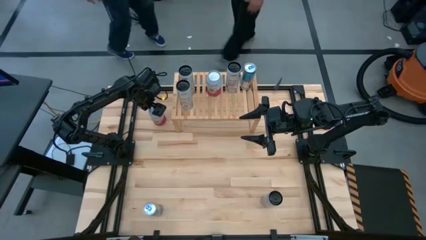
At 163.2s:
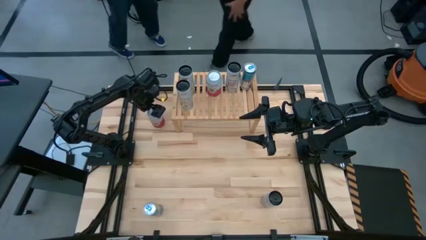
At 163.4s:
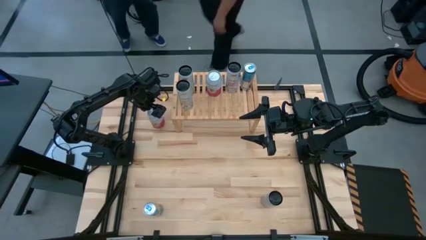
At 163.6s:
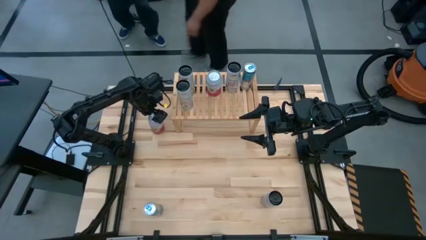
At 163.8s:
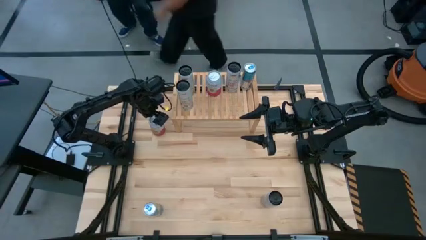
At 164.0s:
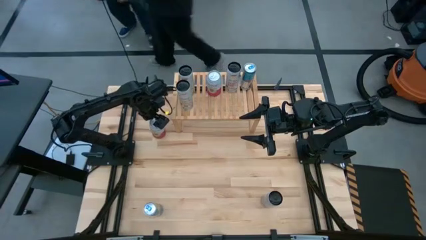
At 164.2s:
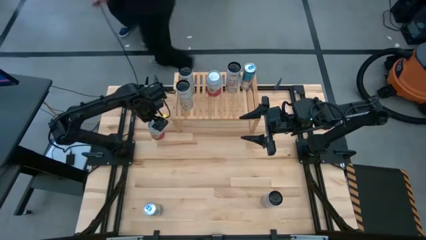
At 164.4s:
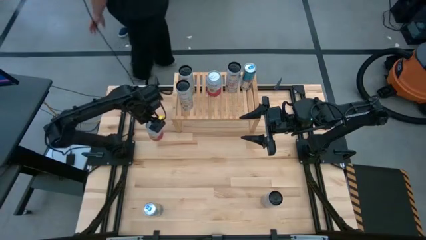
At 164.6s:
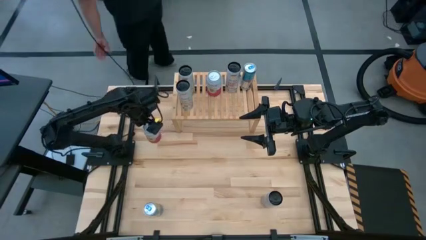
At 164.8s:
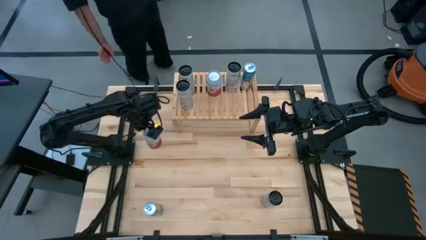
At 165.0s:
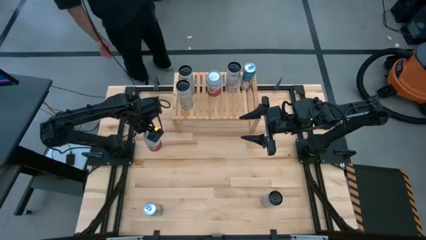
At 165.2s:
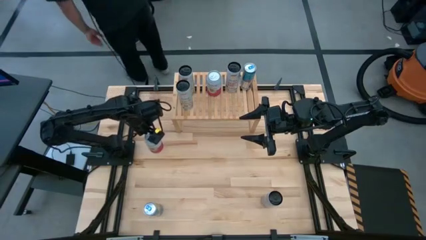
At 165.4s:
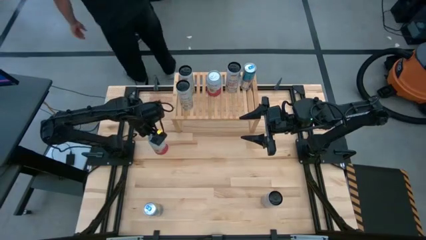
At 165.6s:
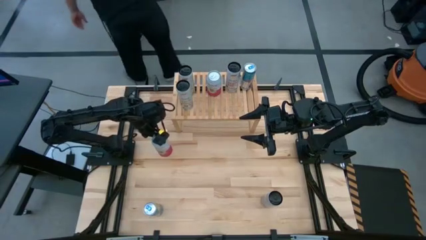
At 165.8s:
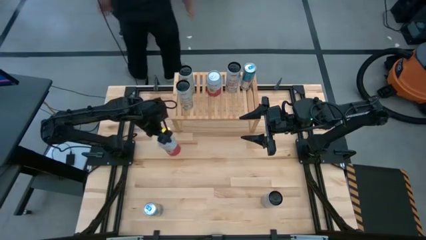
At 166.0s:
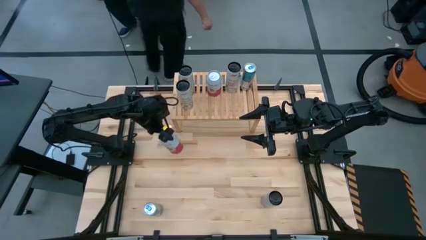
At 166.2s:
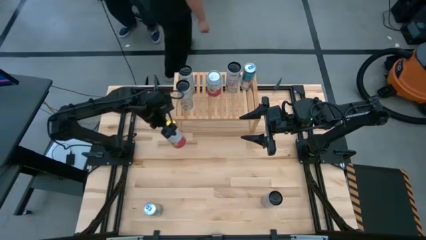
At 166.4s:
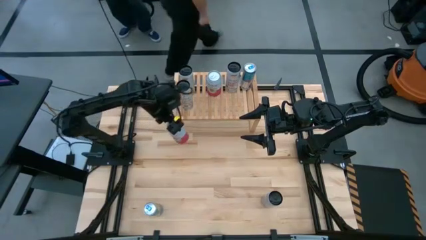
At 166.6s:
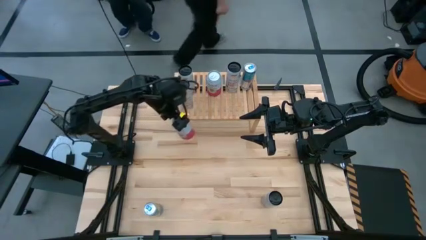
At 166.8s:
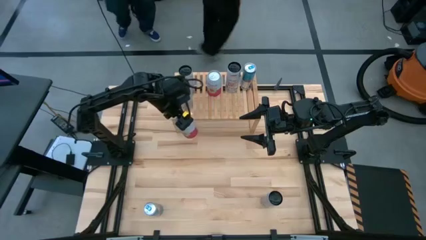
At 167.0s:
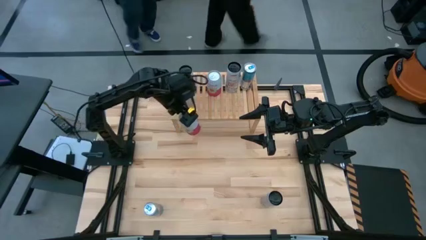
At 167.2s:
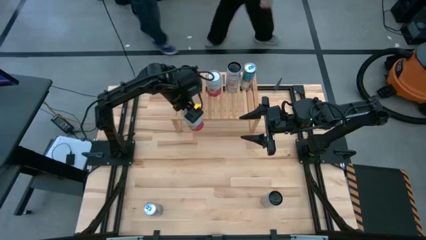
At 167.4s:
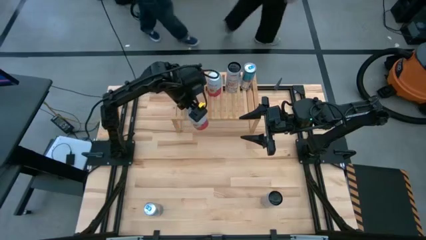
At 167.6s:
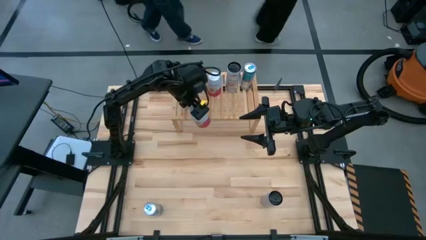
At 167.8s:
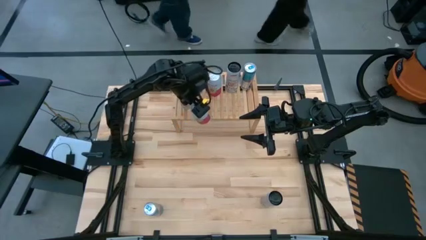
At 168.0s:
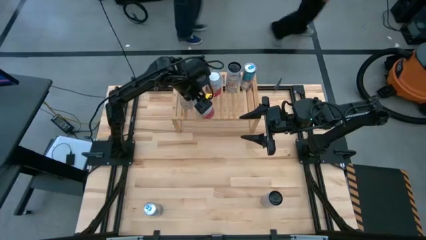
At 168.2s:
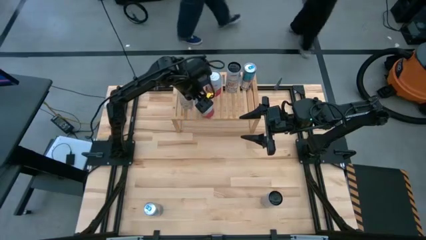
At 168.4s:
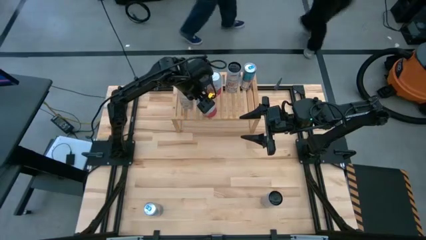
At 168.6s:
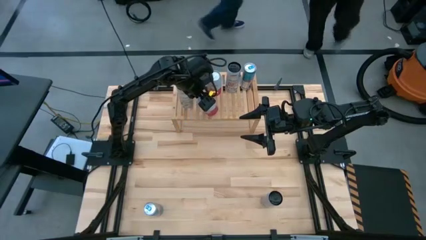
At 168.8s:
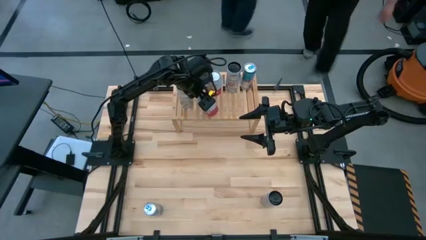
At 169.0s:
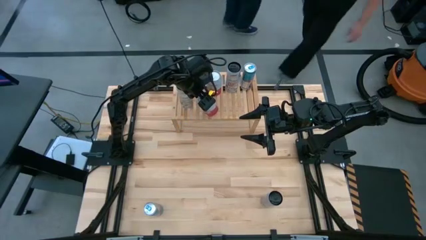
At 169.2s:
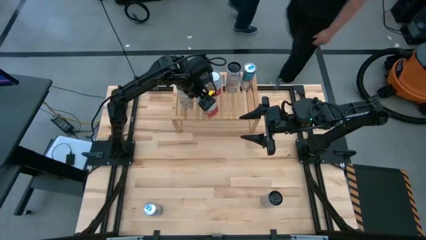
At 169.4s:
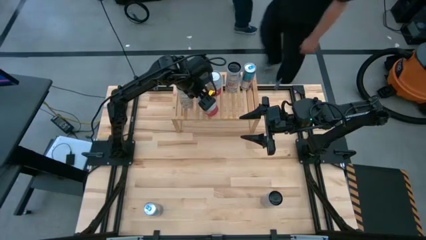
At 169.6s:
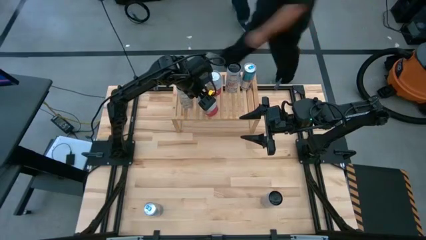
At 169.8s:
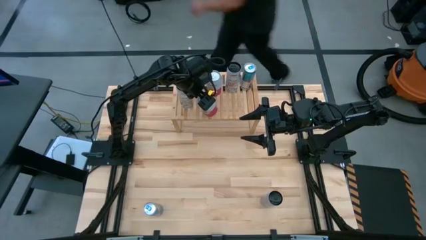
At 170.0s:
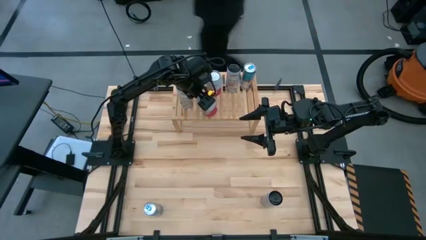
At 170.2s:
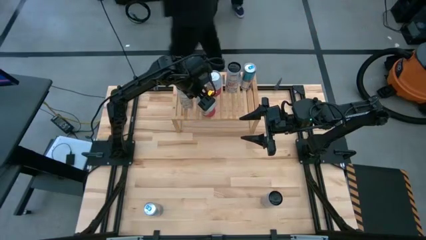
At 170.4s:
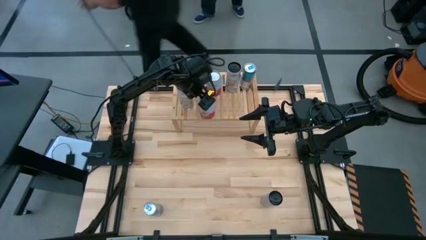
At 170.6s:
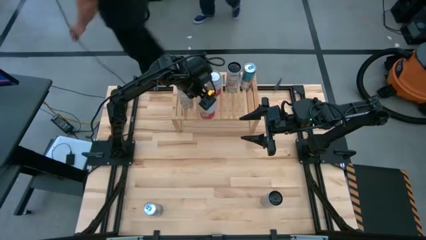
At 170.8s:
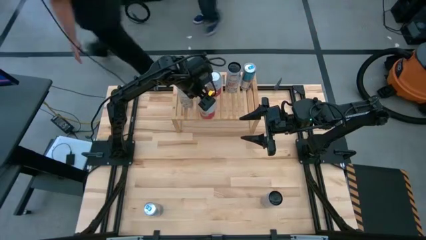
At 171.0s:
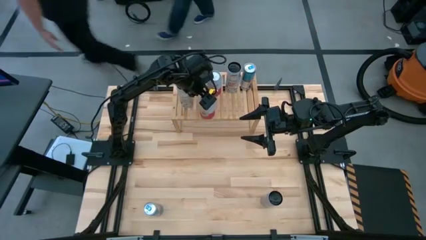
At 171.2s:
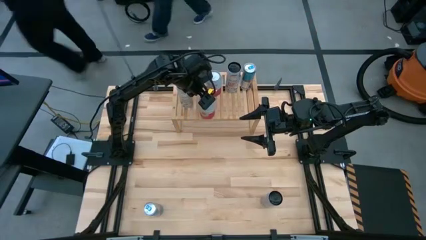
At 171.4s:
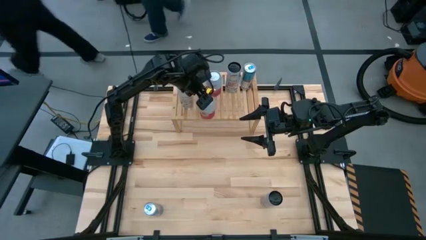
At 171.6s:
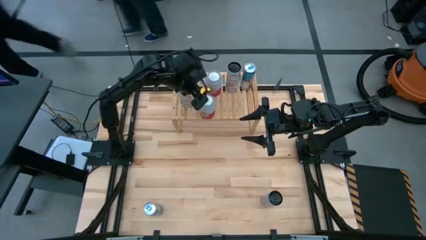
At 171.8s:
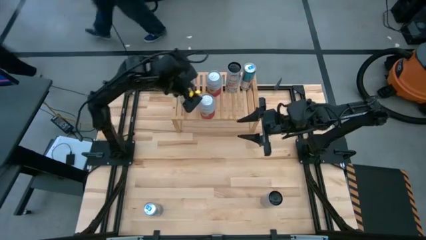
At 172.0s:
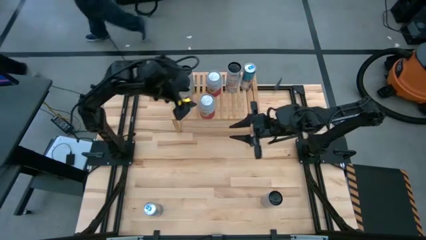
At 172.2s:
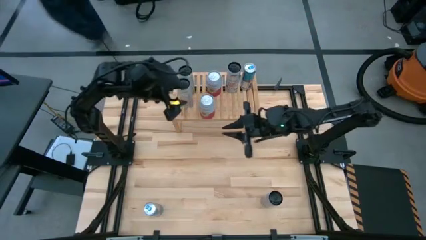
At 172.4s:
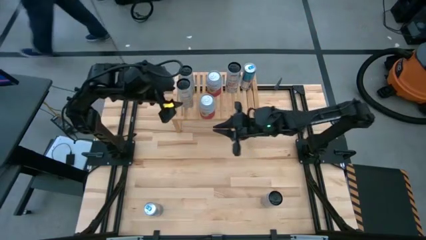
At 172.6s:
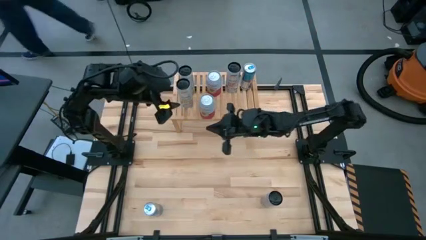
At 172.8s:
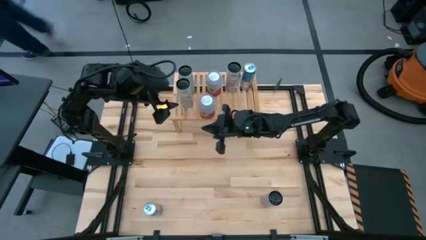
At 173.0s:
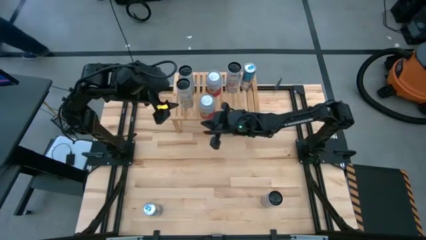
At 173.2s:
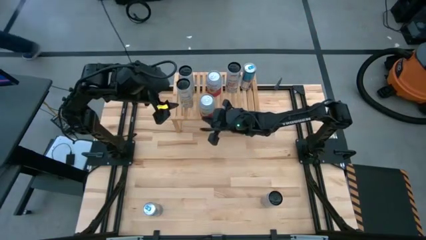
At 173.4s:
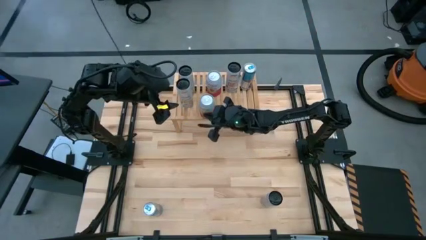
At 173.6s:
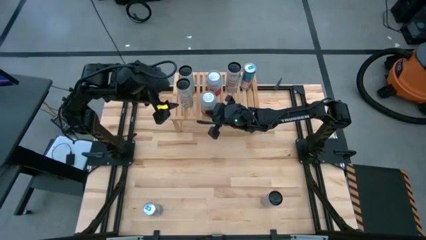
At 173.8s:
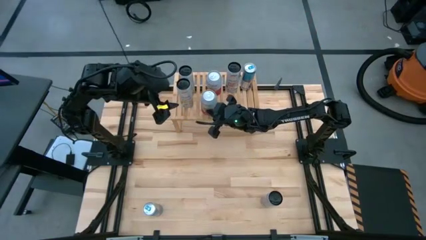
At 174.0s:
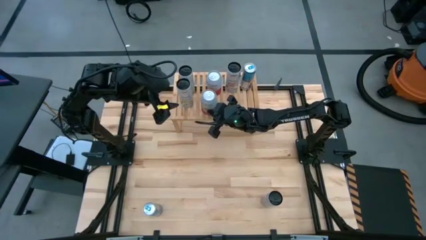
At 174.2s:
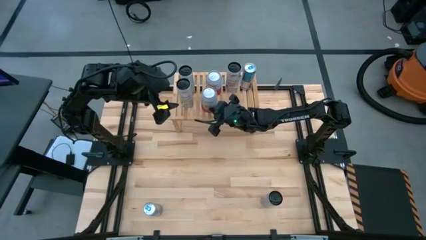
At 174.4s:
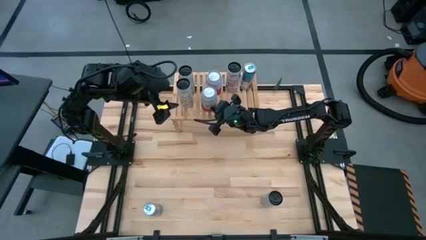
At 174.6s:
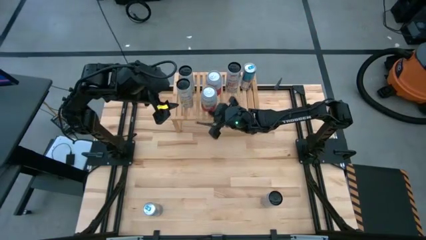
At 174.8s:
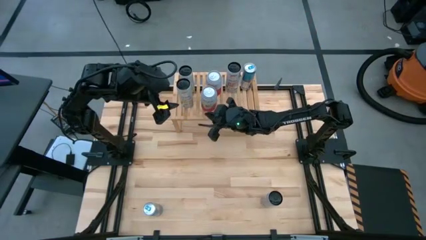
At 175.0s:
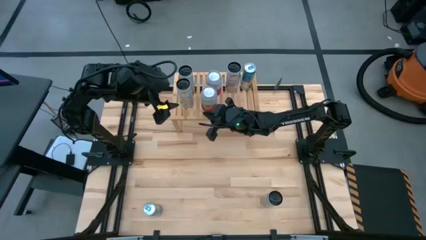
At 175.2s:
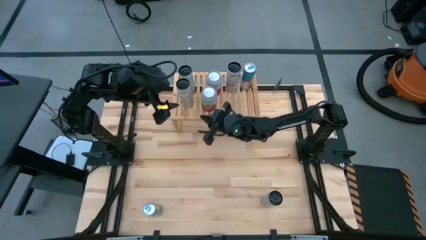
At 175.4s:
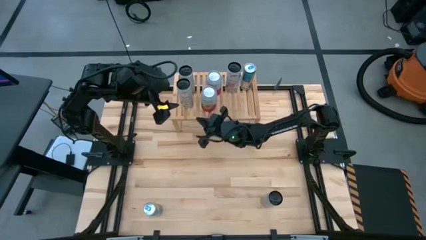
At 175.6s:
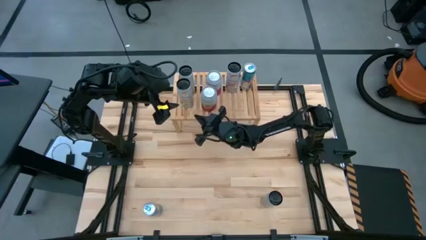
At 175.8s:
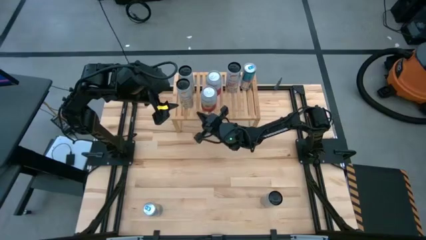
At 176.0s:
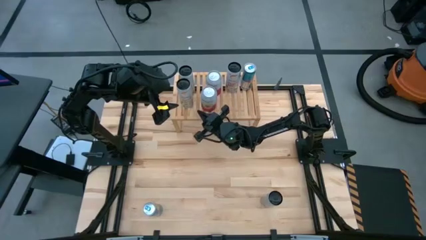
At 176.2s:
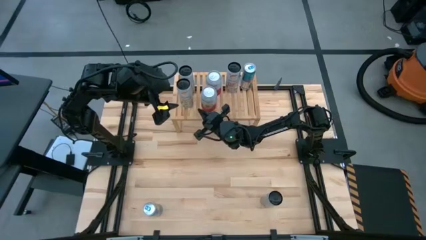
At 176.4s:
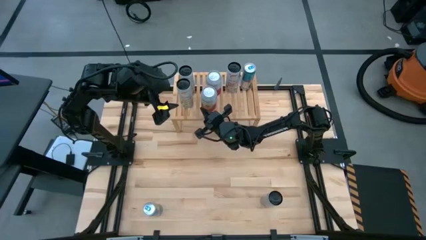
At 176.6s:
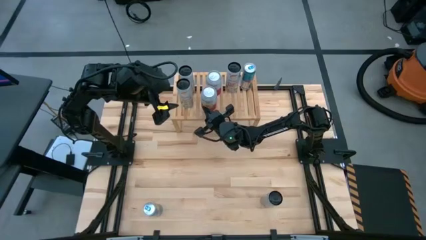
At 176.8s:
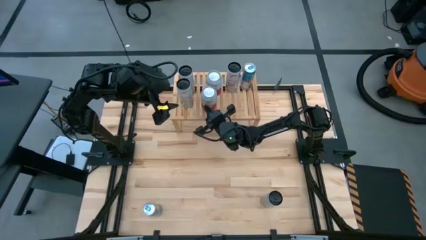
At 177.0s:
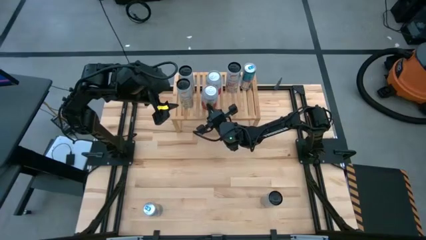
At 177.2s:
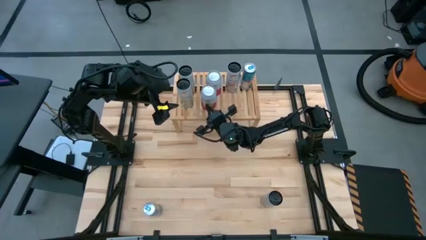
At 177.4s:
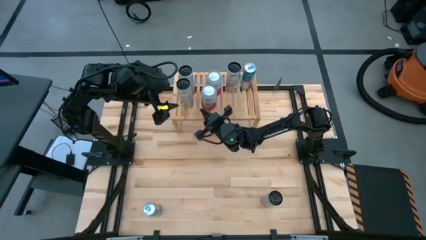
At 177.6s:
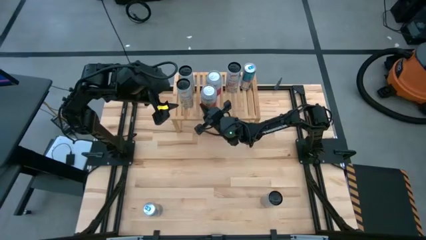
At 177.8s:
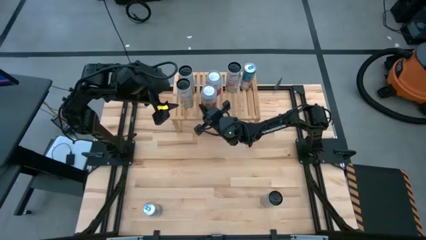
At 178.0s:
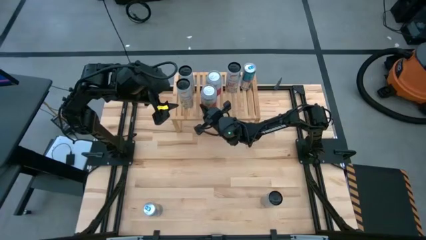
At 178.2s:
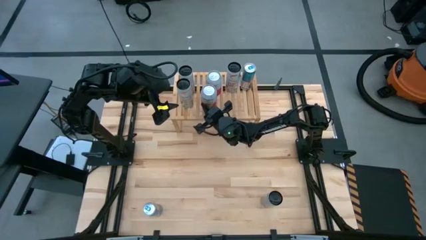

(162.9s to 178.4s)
Task: Place canned beverage on shelf
Put the pink white soda can on the shelf aligned with the other pink white soda can
